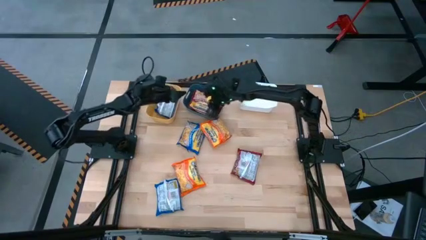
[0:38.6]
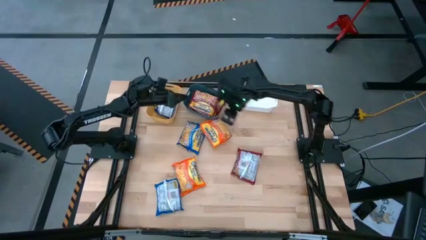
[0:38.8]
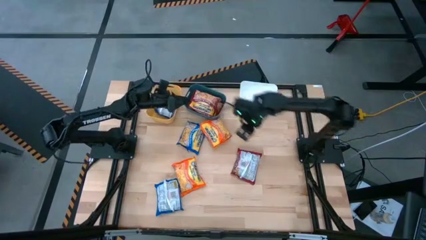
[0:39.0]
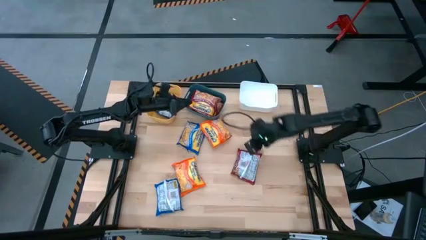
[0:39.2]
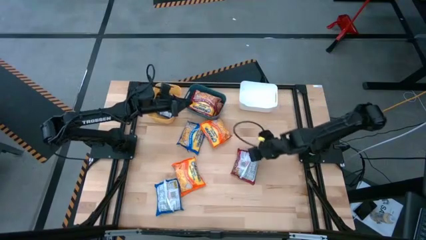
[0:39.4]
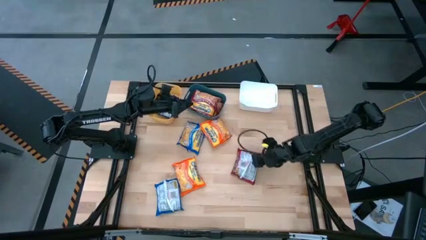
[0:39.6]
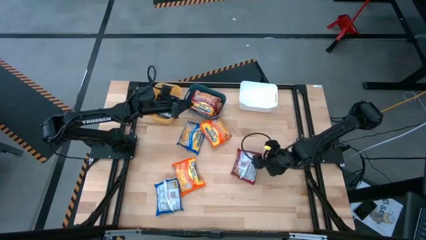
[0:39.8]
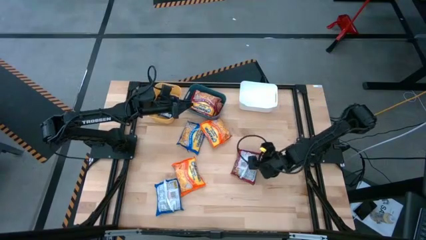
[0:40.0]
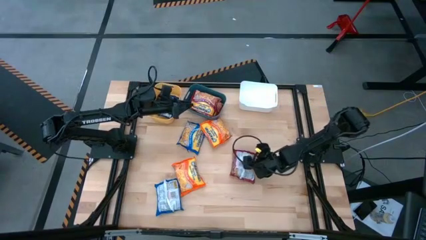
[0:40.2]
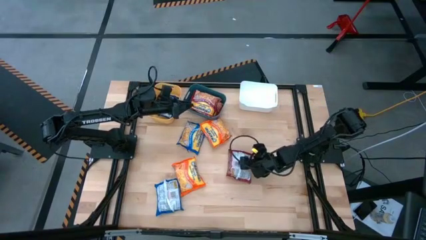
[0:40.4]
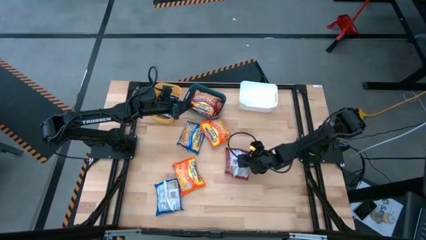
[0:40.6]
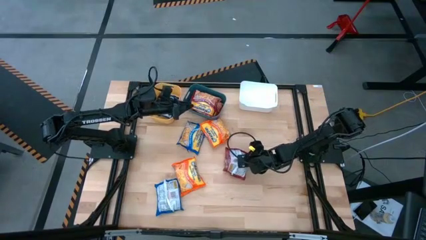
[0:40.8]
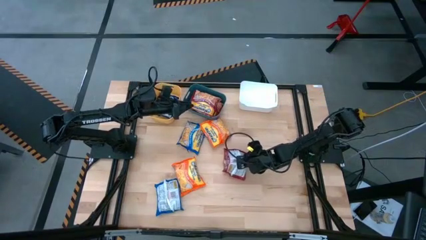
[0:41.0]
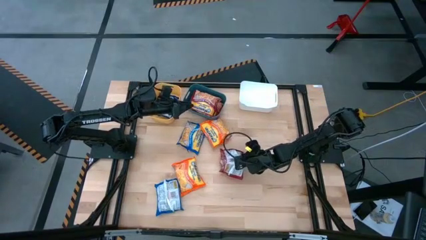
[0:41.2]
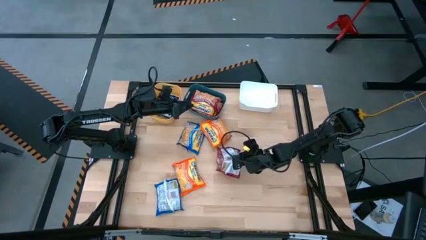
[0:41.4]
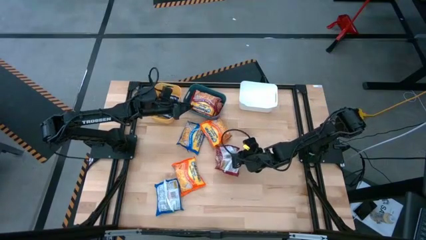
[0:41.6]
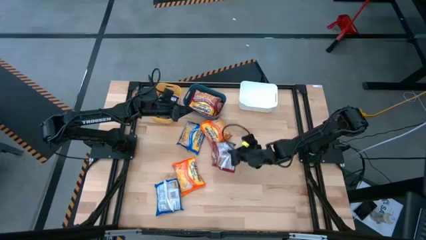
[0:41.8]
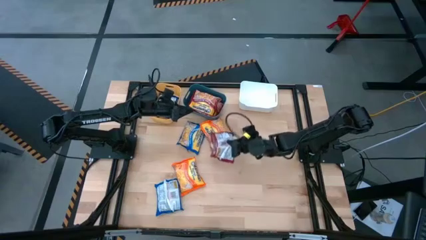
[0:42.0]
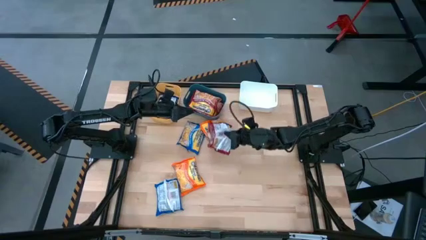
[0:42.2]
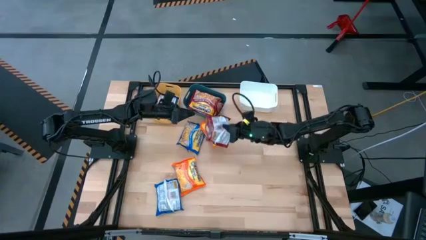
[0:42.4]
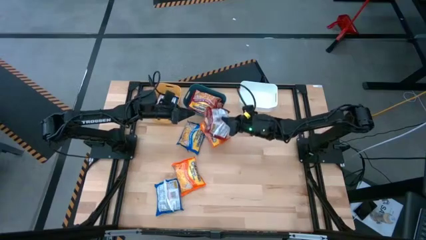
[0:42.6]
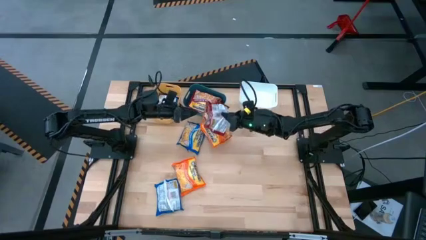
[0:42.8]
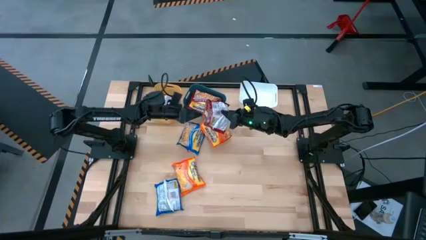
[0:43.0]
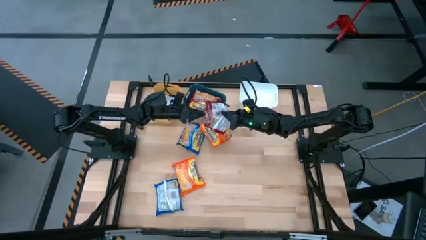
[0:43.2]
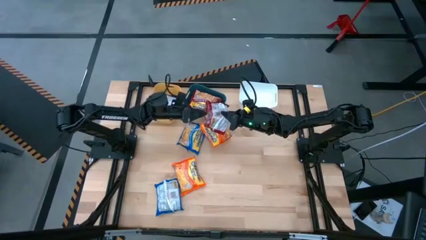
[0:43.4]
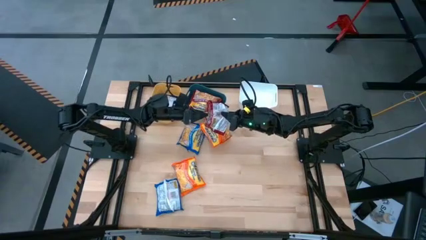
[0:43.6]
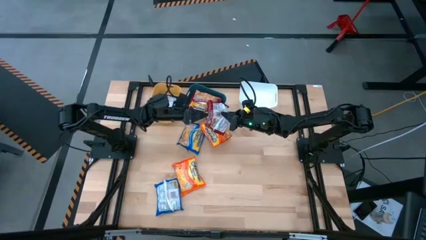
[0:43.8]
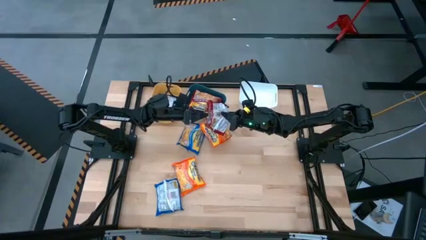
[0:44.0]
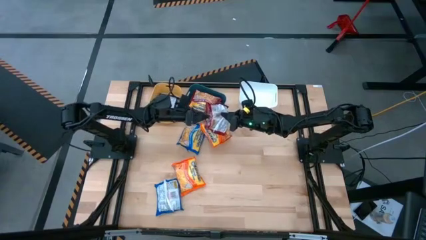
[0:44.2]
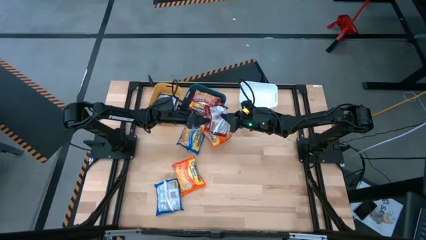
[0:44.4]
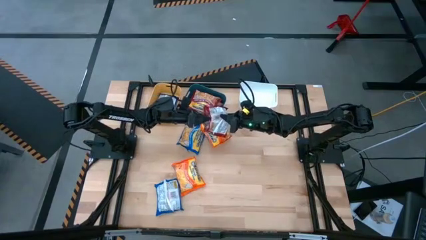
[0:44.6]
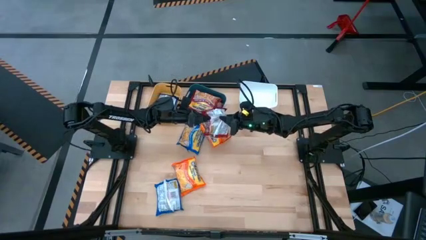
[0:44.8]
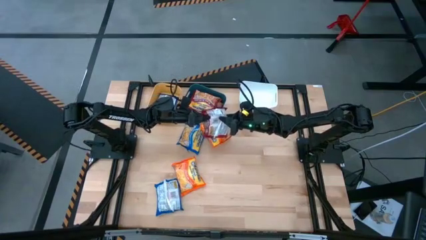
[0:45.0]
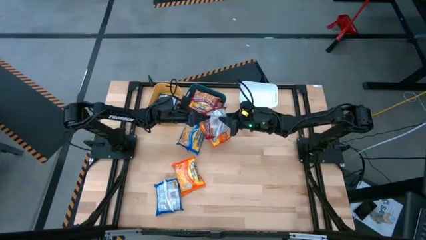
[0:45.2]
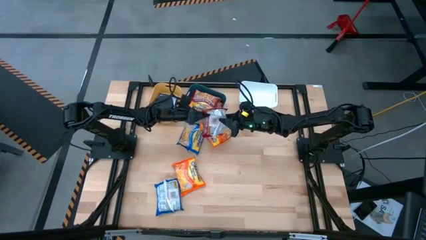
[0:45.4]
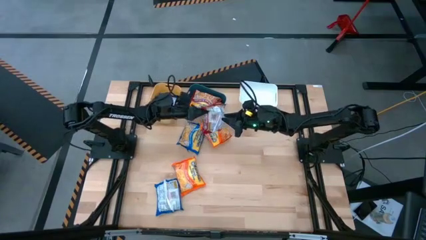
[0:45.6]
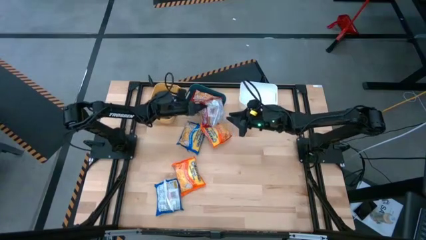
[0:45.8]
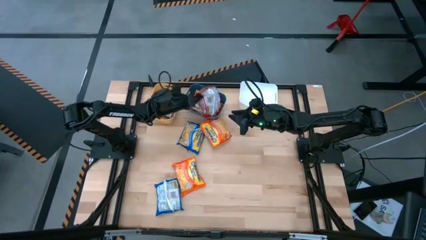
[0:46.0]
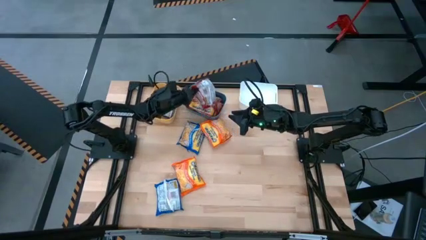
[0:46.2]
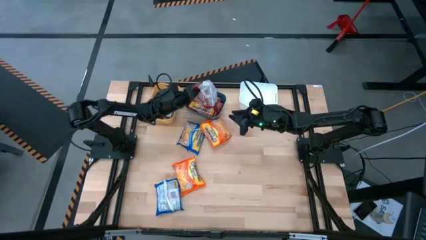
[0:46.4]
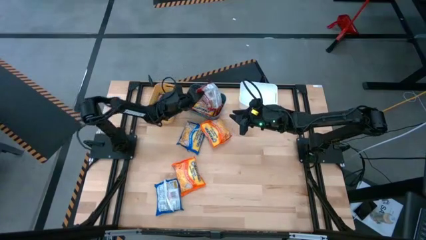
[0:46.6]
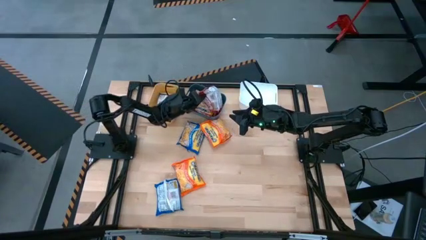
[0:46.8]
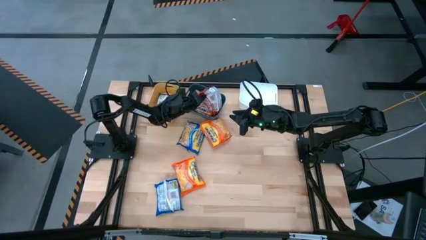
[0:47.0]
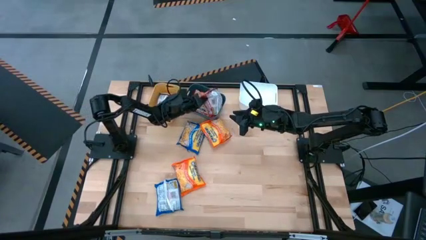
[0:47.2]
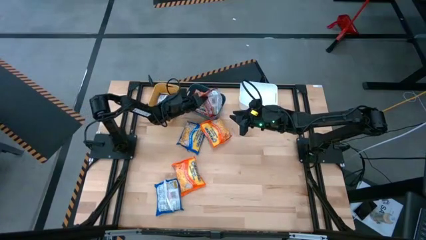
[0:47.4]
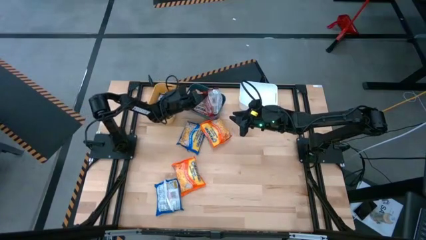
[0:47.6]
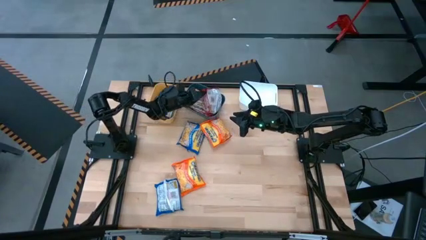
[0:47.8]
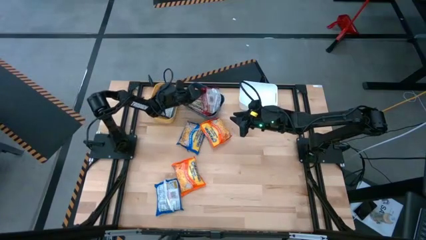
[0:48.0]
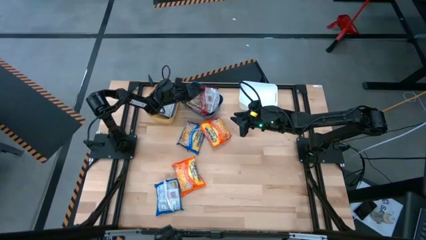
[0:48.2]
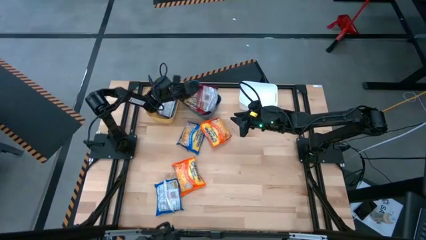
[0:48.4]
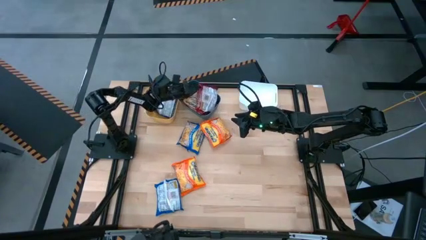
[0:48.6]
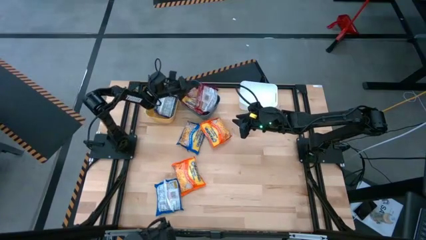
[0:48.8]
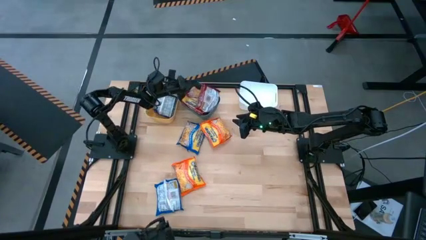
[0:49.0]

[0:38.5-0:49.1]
Task: Sort Maruchan noodles
Put the red bag into the blue bin
